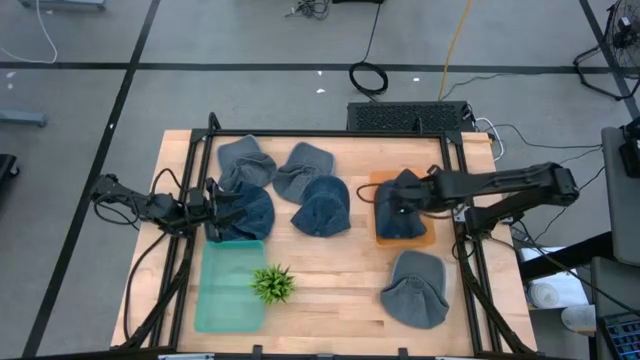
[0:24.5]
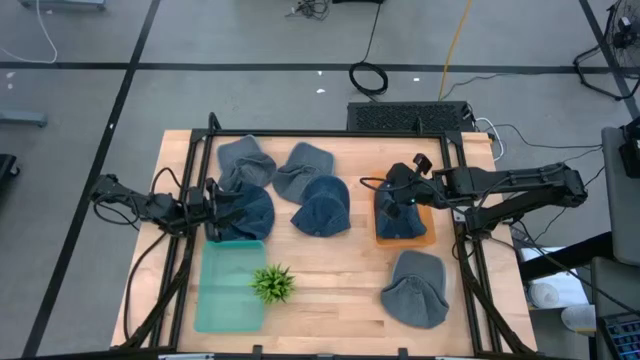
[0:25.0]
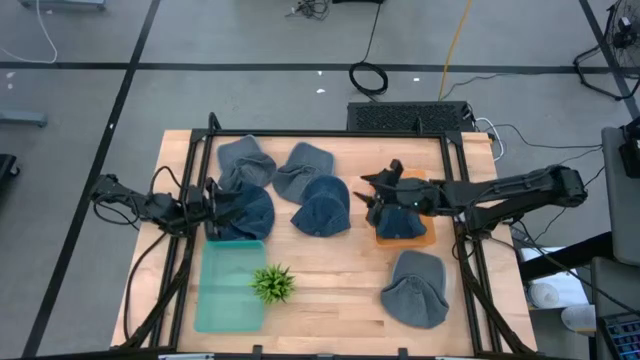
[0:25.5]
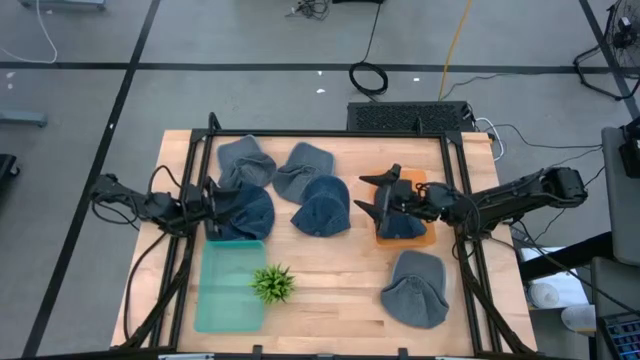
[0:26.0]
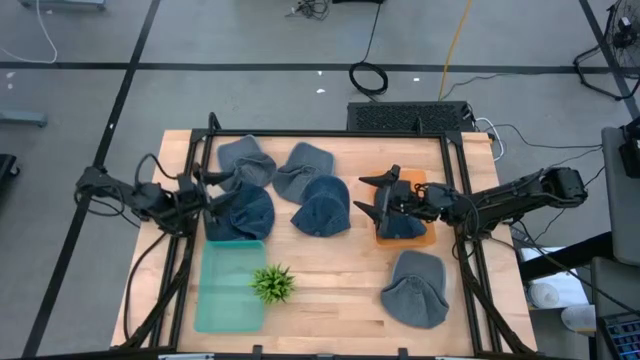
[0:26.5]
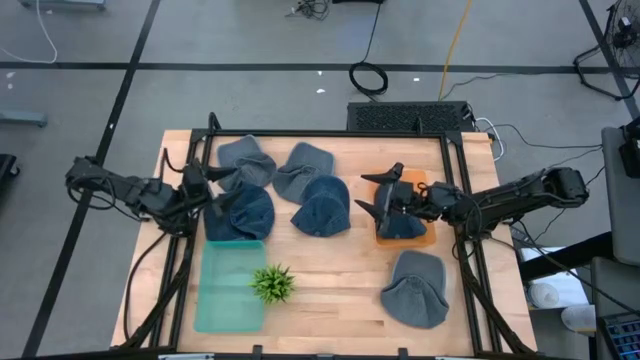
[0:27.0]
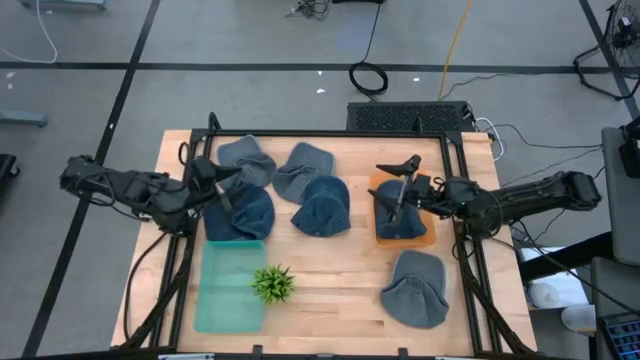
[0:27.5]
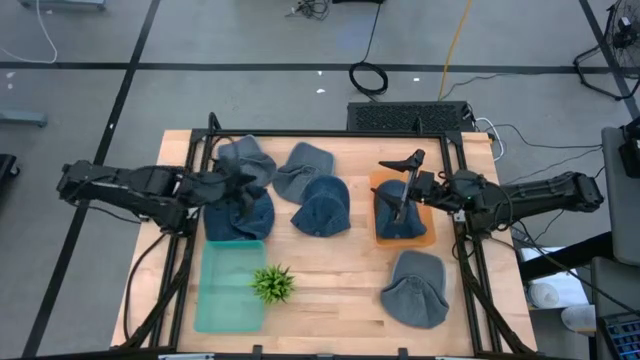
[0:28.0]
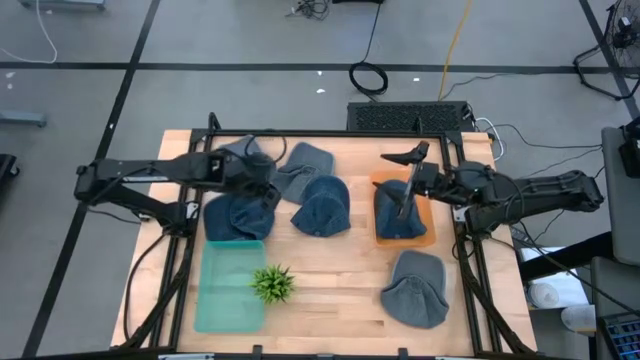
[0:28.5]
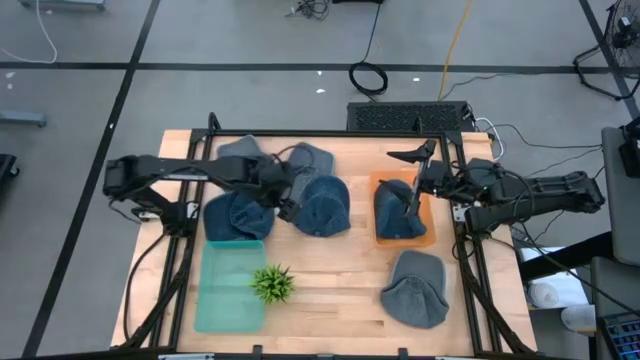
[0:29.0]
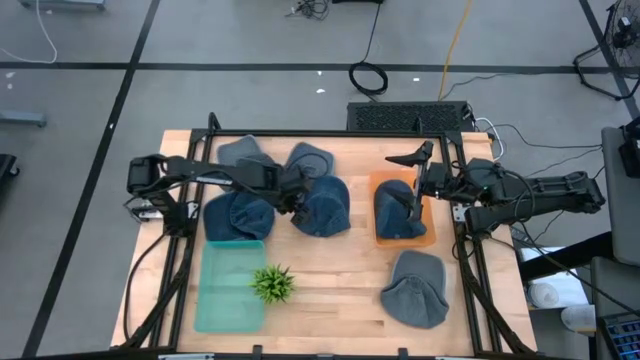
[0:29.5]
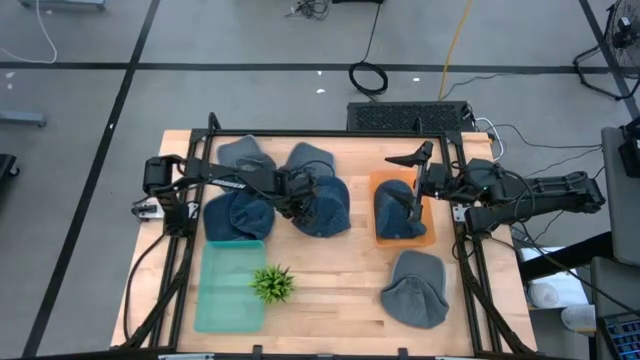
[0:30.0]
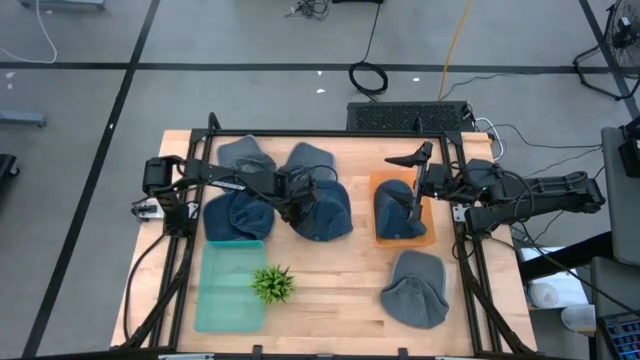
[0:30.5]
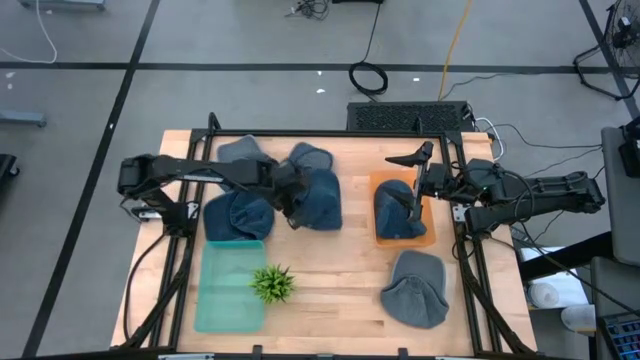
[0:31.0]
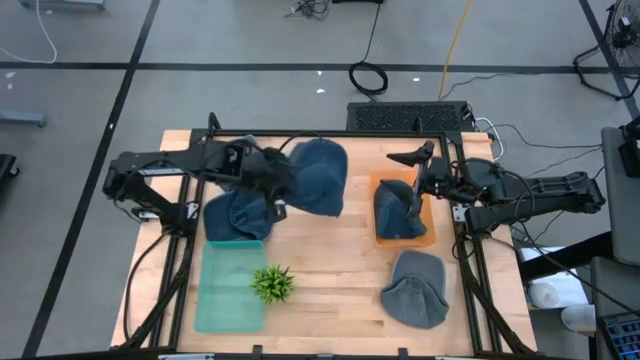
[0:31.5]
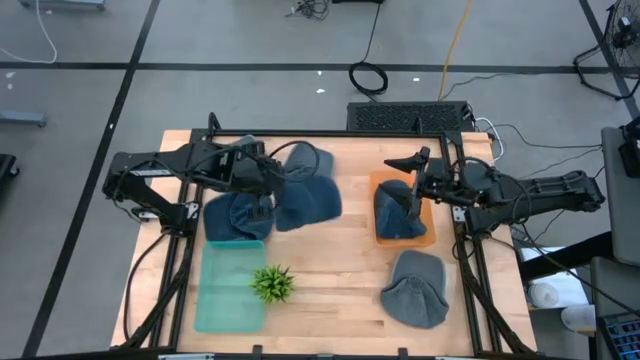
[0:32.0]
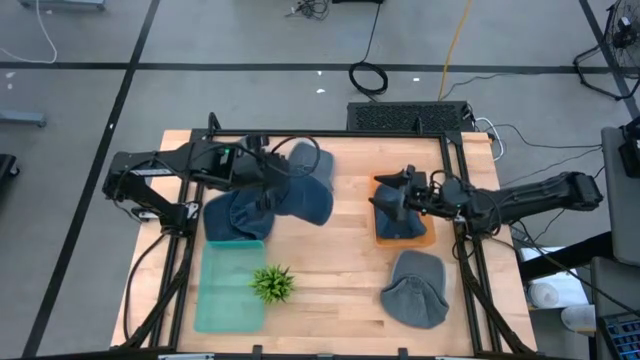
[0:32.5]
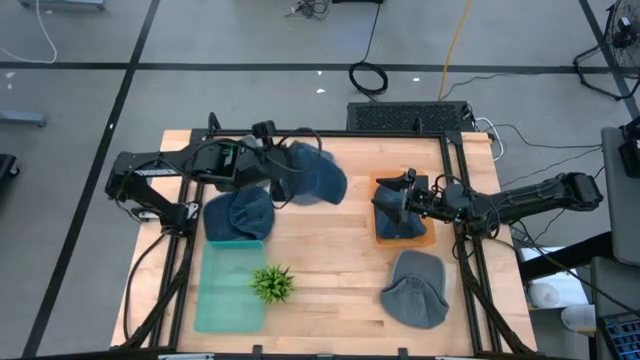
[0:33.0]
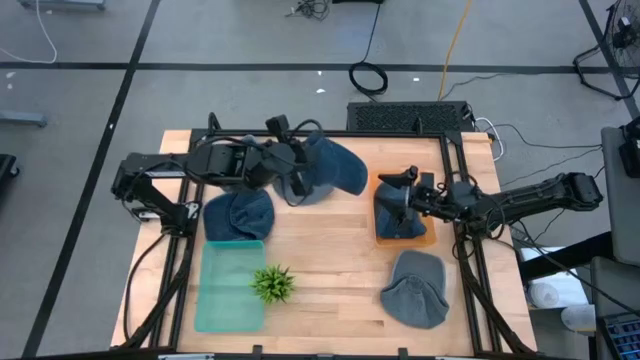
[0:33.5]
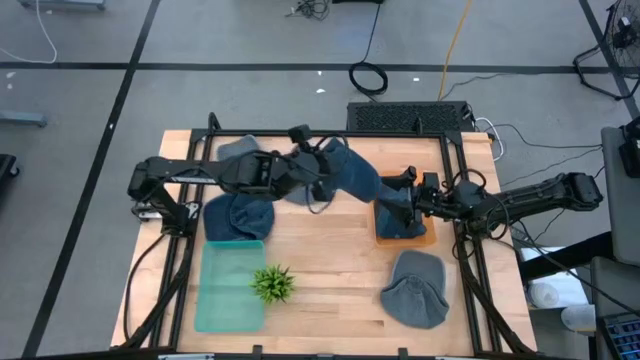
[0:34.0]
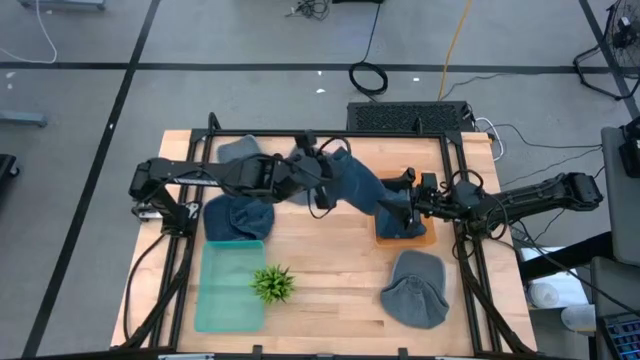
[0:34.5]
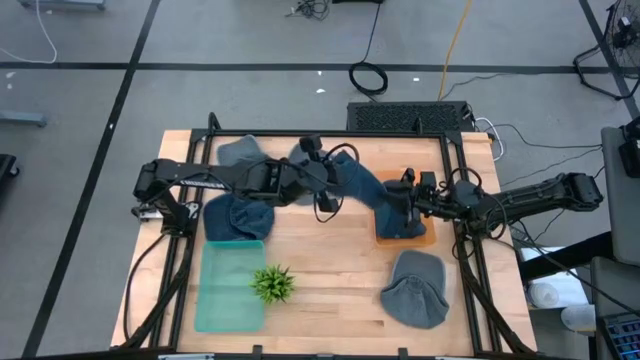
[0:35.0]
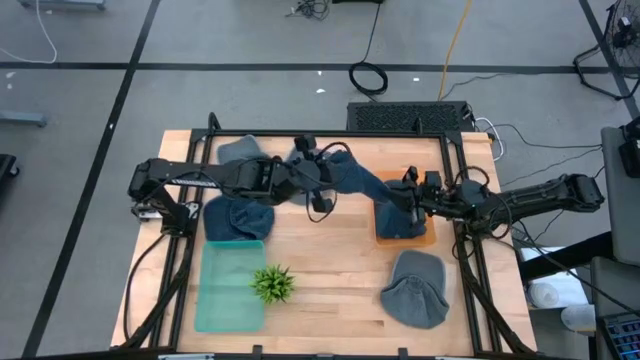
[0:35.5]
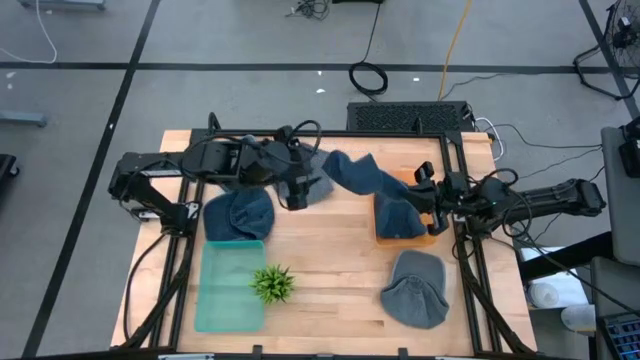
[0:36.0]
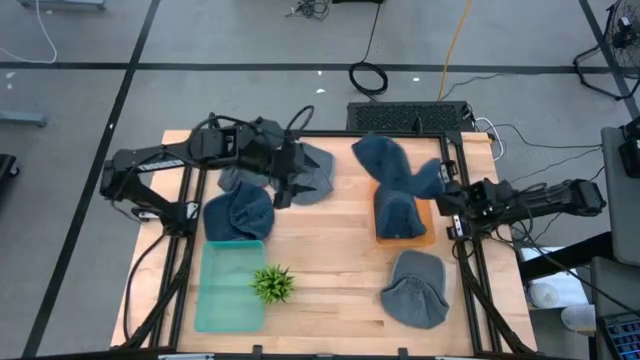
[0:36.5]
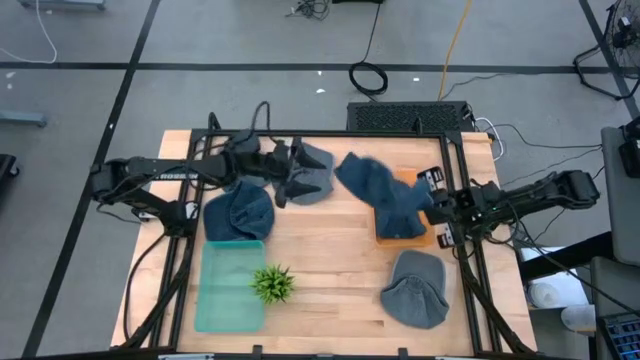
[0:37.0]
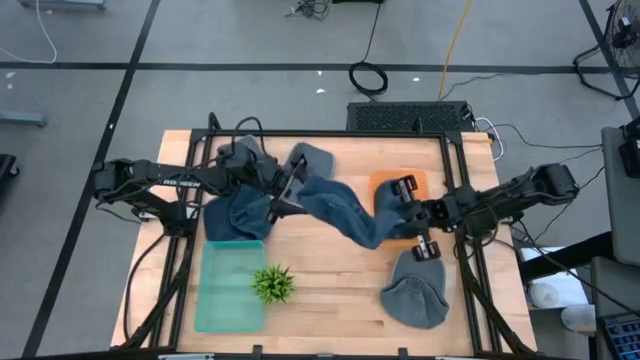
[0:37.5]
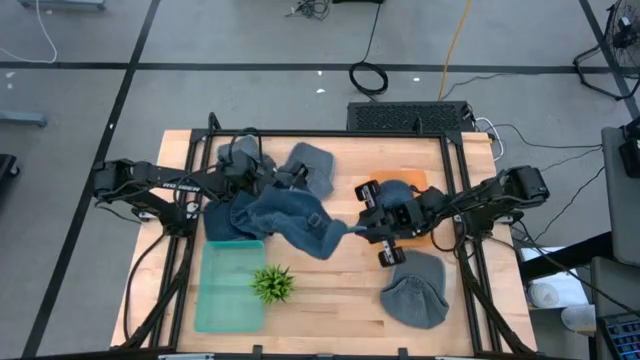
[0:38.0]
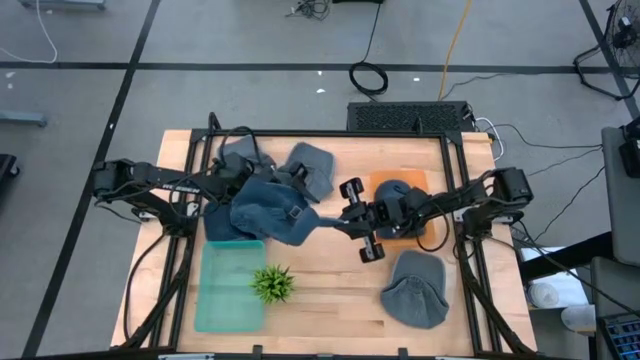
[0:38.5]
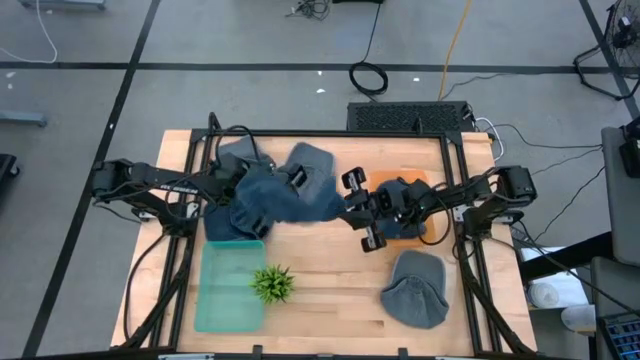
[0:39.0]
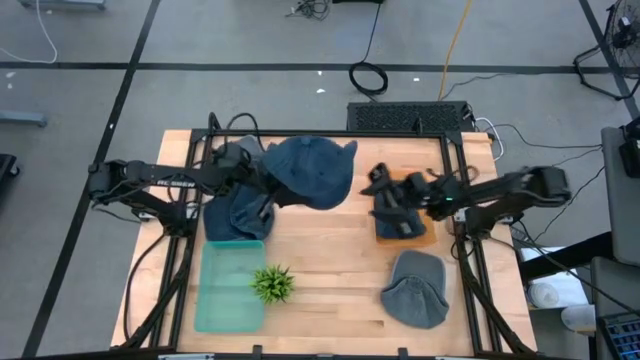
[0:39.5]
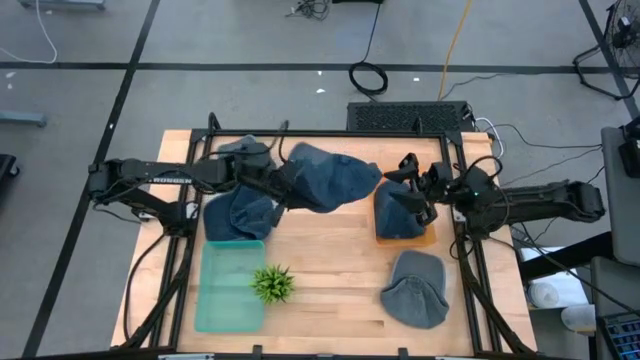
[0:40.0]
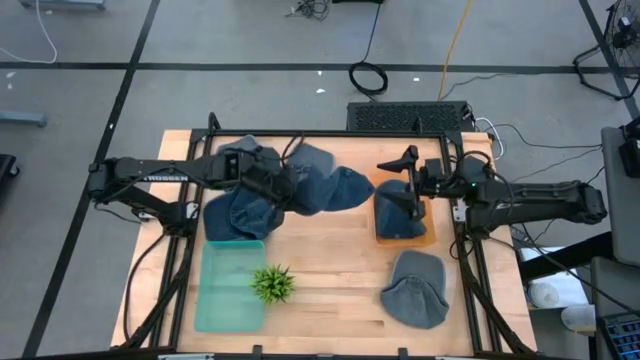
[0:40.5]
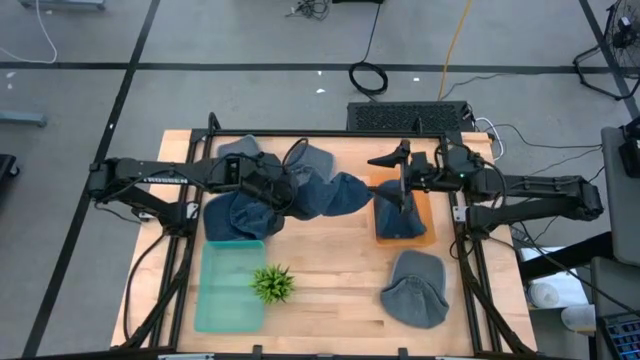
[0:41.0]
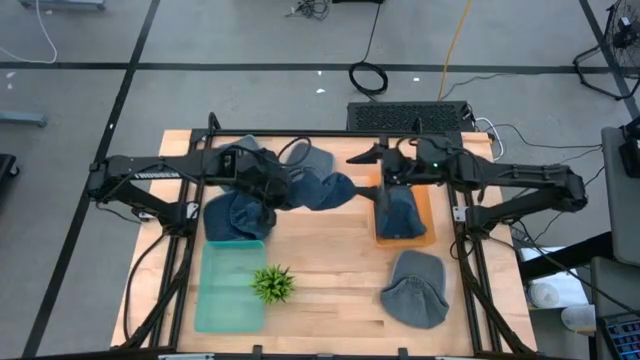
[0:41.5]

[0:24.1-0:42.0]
Task: Pick & Place hat
Put the right blue cap into the orange bin
